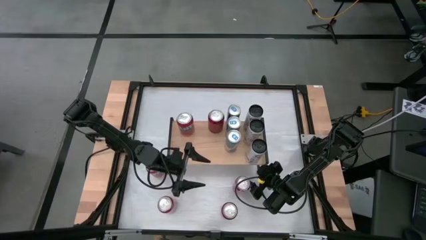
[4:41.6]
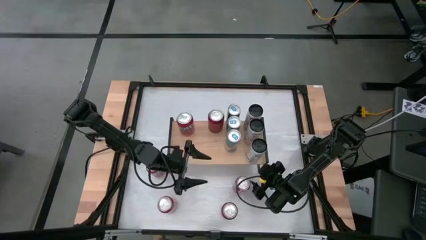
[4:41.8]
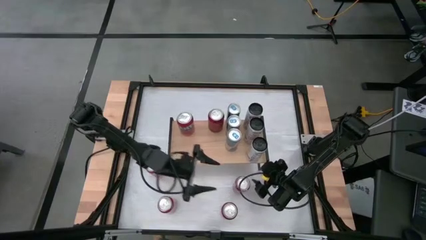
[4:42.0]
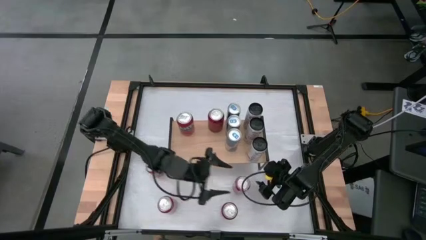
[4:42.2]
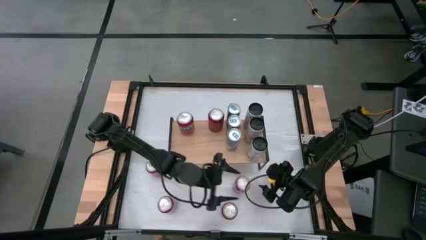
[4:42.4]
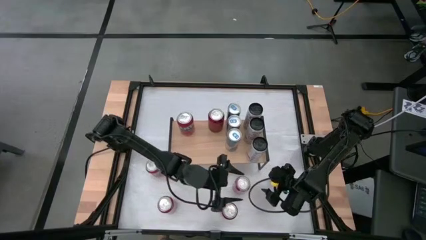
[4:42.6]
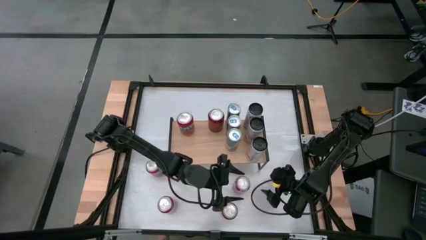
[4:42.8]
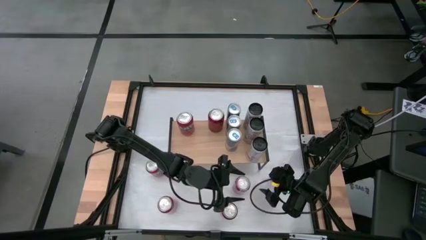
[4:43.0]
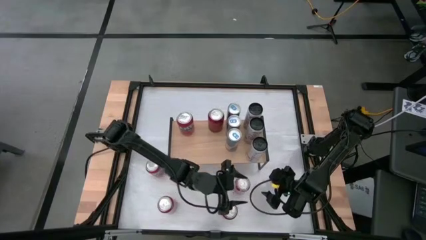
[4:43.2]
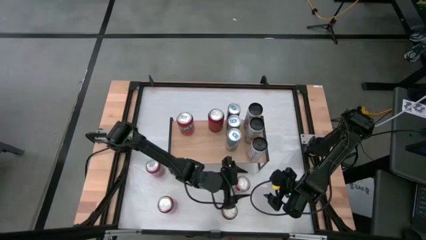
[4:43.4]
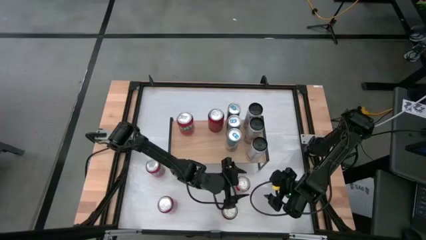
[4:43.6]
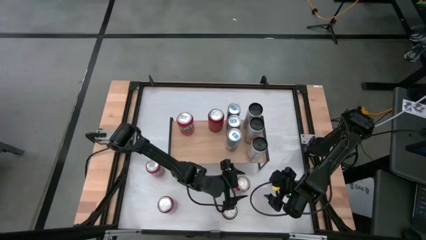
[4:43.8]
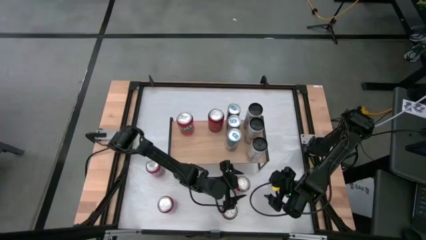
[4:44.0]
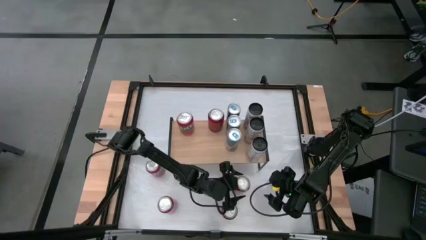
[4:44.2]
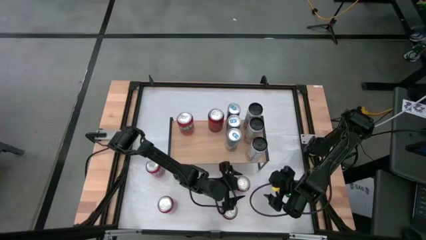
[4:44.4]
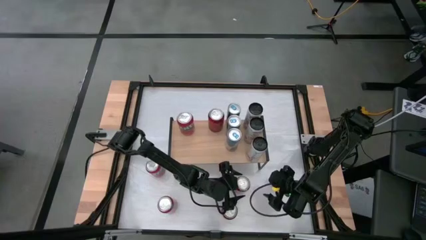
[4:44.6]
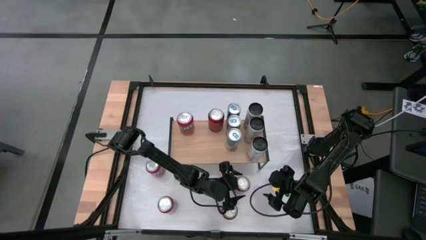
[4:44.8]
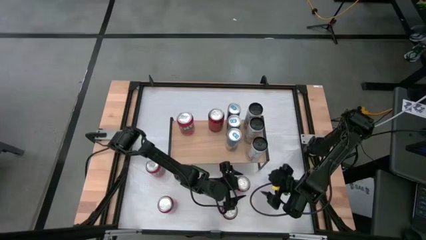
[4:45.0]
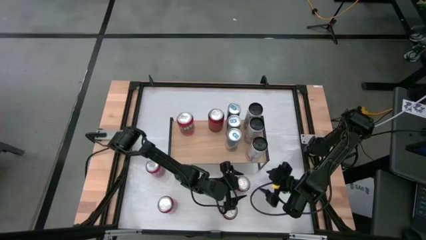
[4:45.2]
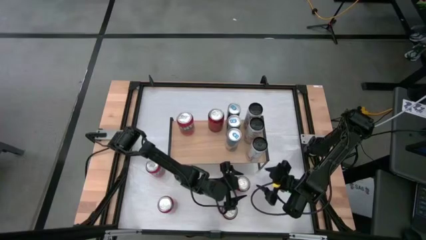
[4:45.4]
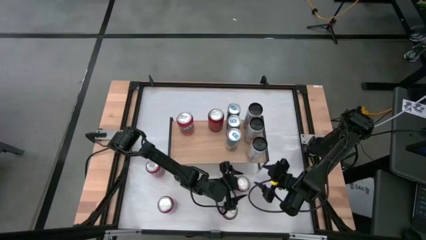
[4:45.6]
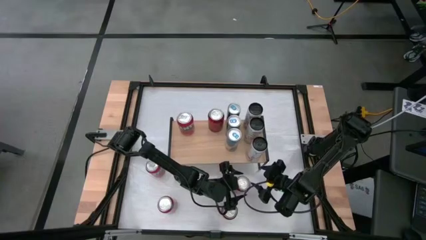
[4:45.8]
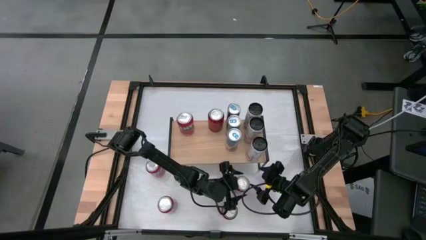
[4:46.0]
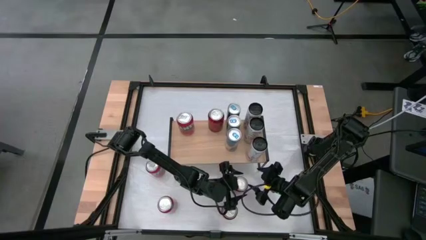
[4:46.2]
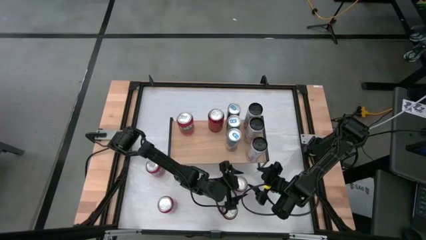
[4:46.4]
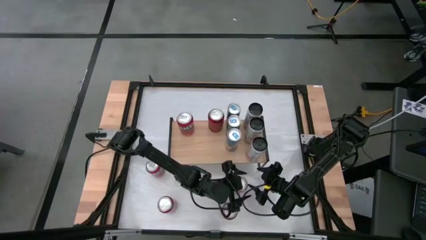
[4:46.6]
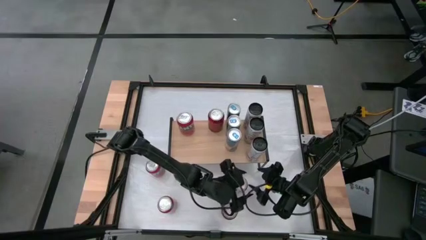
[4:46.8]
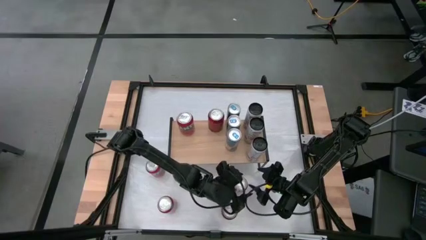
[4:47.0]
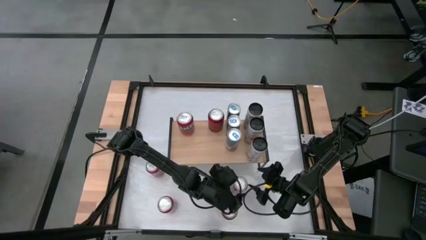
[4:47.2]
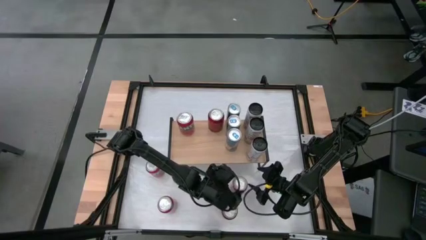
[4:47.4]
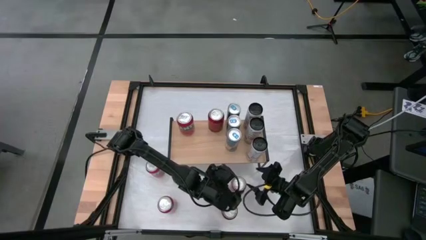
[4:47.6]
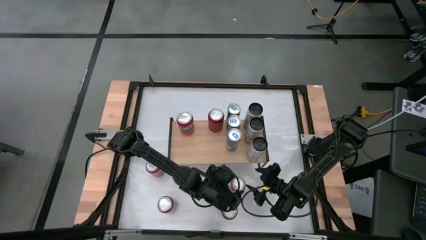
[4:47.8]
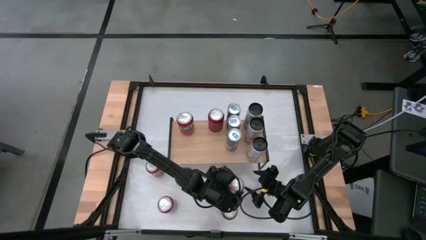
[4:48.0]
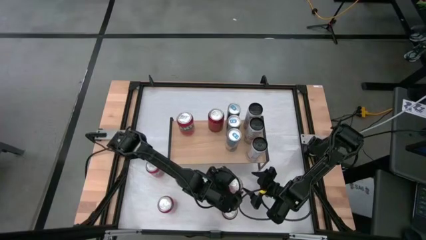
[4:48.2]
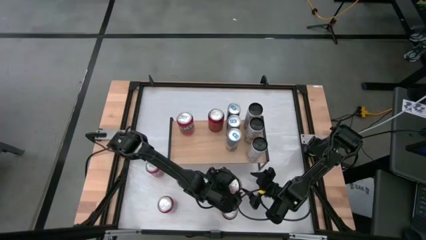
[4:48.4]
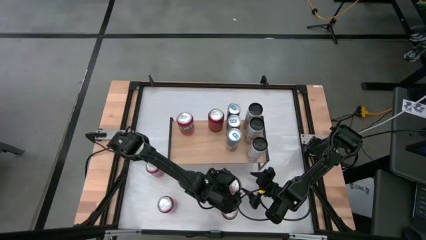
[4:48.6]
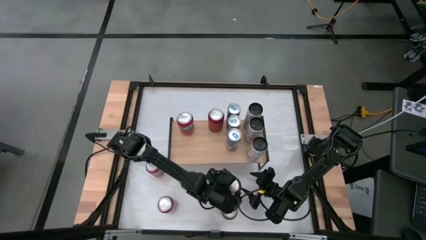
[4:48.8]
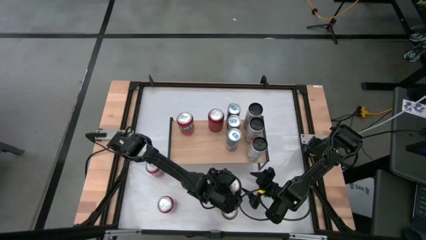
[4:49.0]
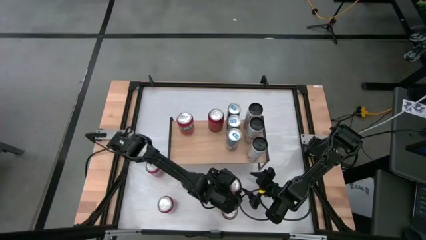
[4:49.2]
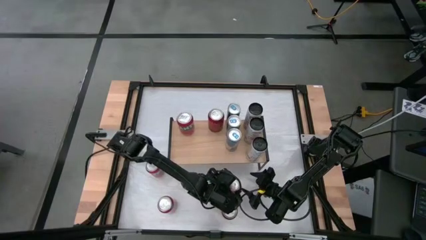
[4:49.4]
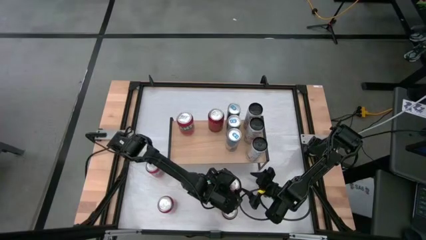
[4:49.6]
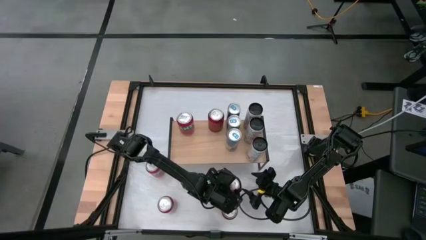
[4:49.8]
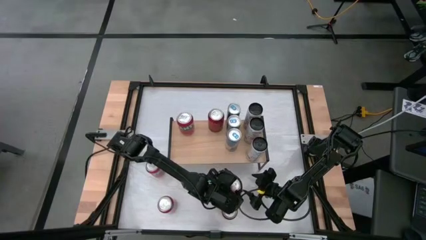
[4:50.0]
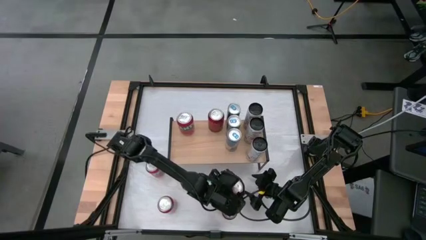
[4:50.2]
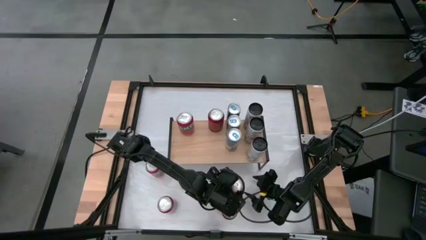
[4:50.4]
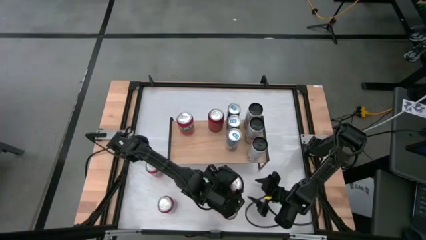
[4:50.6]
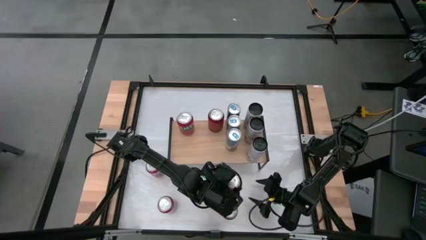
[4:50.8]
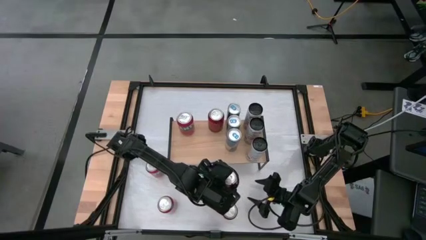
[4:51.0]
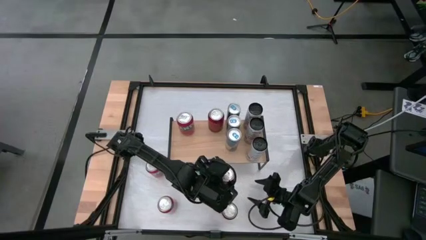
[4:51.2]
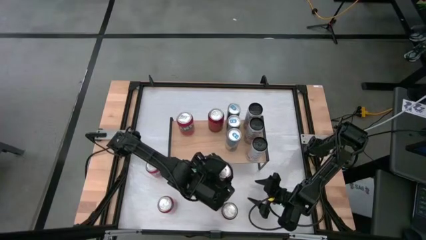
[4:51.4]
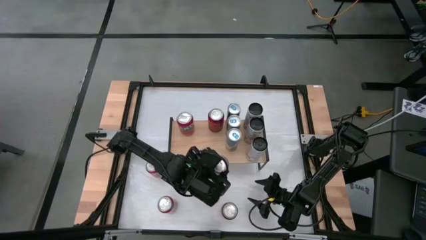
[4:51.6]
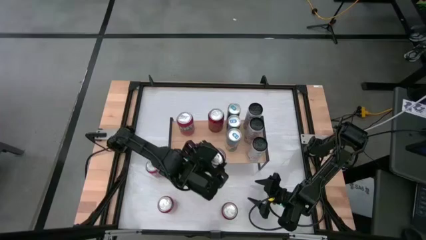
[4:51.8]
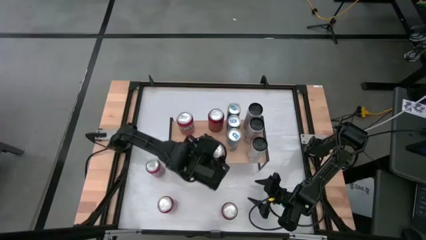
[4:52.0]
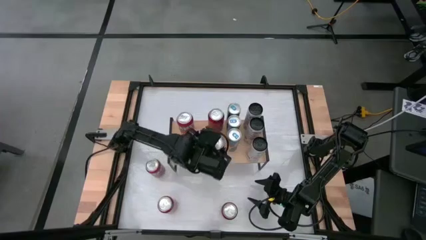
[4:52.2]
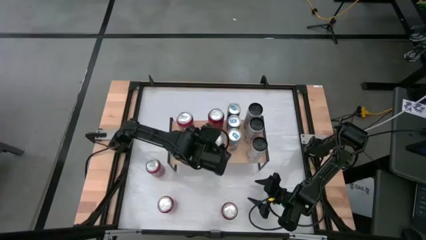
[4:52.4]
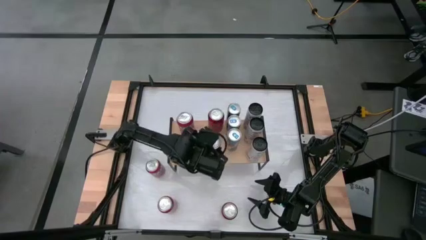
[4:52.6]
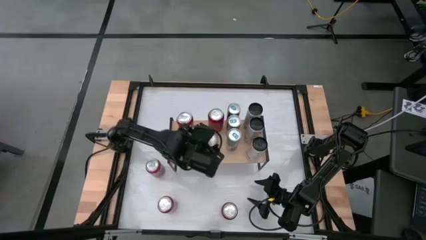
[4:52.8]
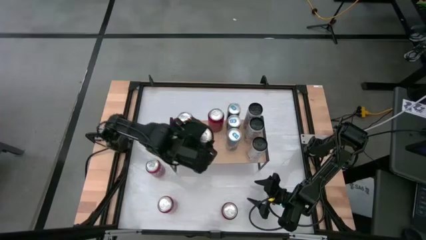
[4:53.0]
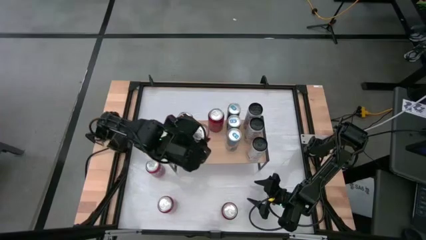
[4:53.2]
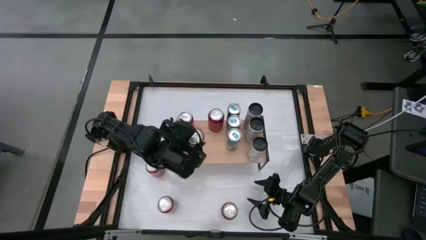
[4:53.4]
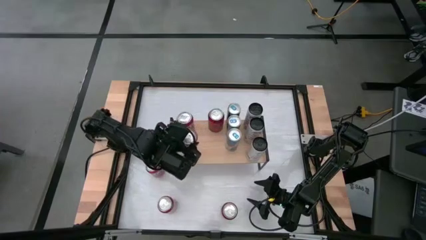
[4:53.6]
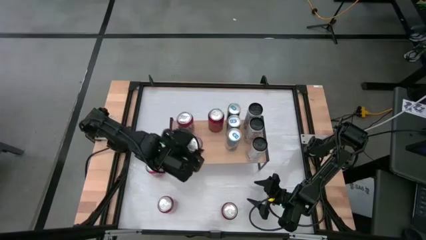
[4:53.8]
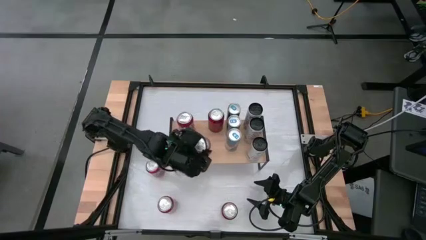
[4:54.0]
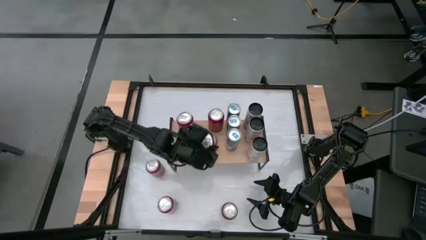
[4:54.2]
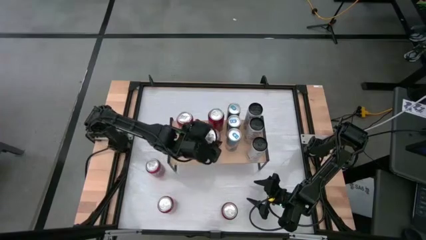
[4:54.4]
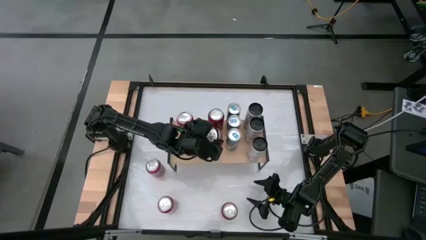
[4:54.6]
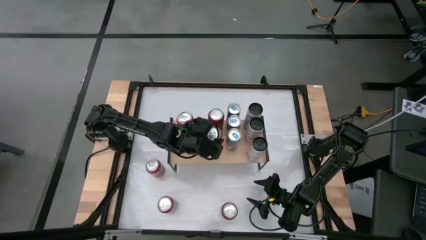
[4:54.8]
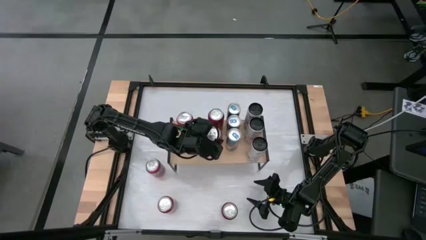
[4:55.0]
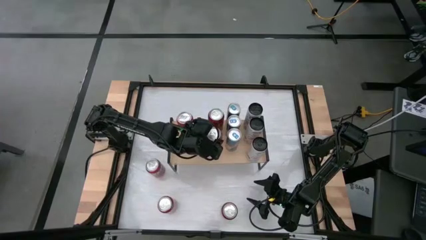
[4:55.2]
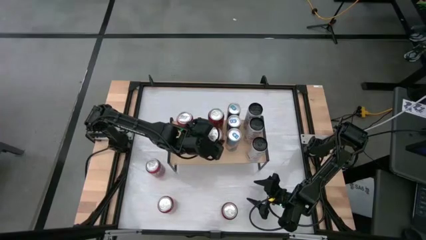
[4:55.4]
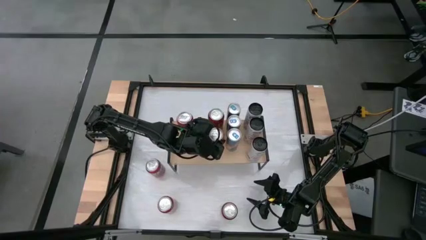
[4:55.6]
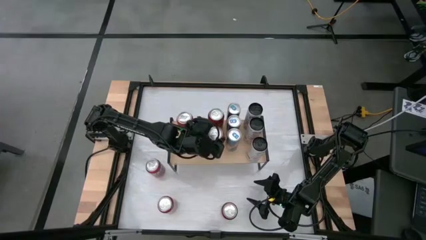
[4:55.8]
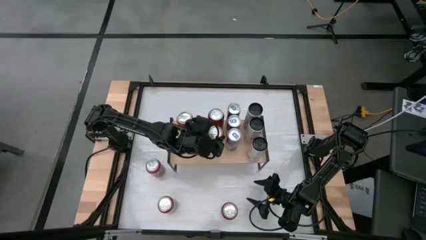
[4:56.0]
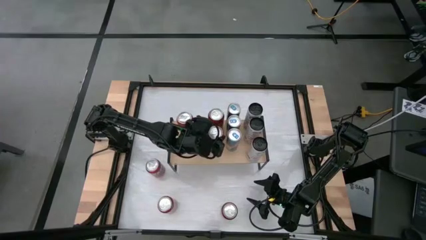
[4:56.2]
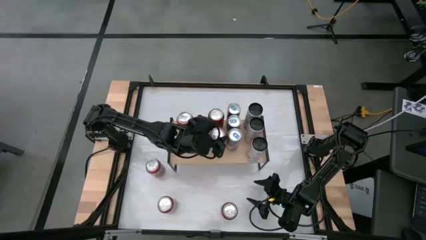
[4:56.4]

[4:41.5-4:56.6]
Task: Place canned beverage on shelf
Put the right red-black soda can on the shelf aligned with the other red-black soda can
